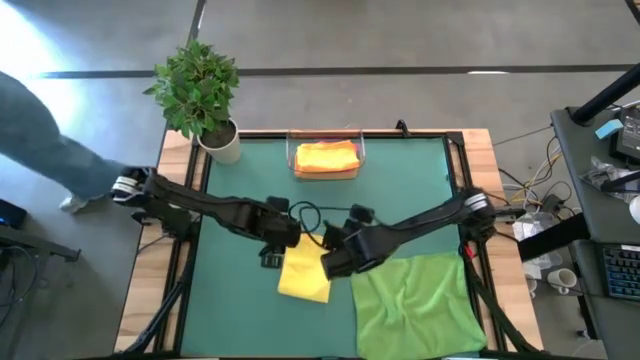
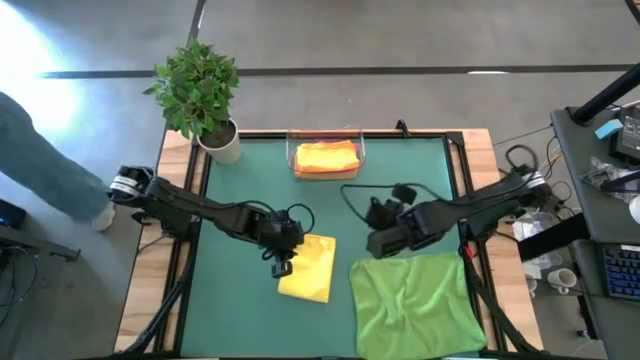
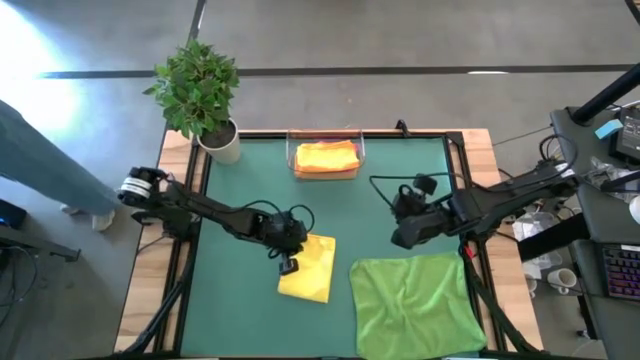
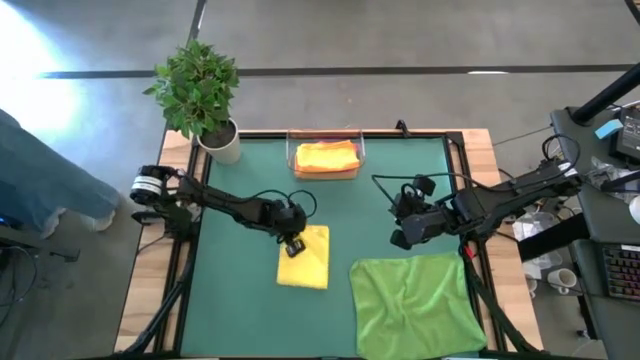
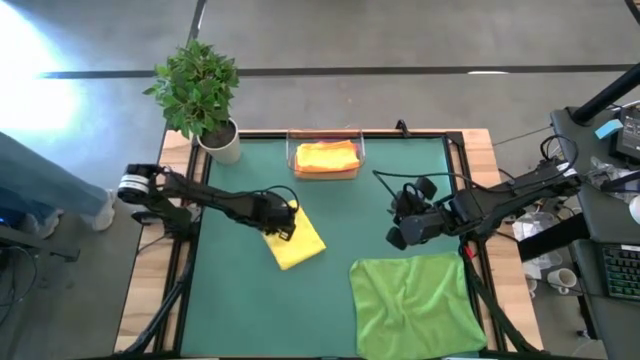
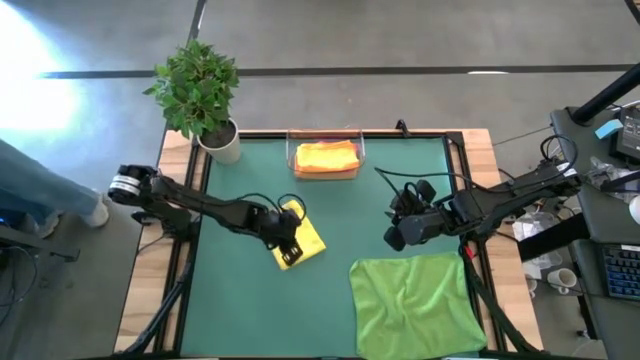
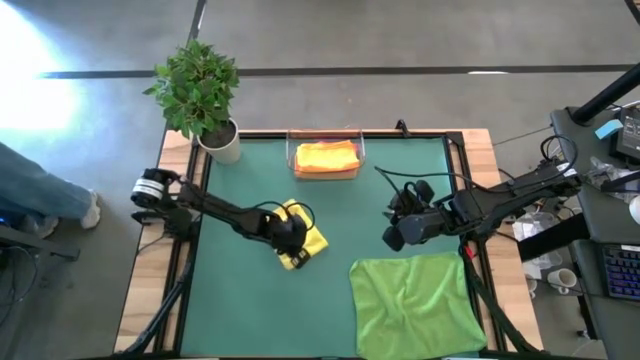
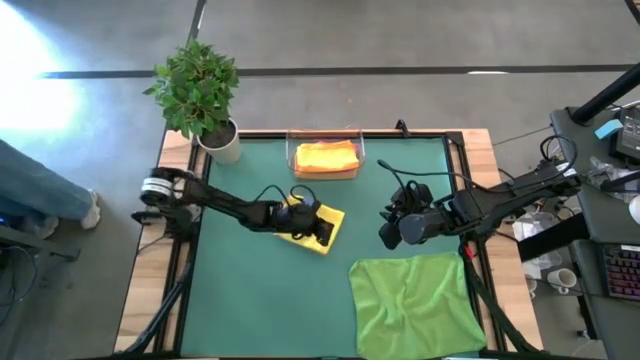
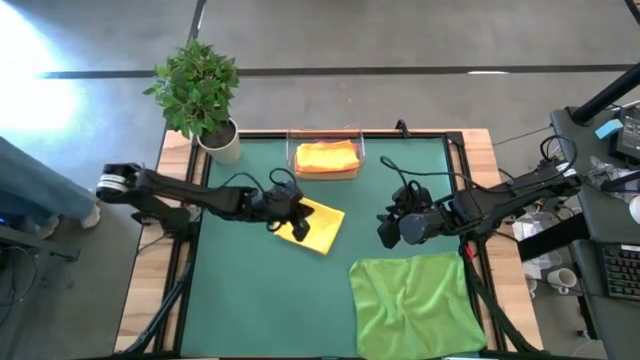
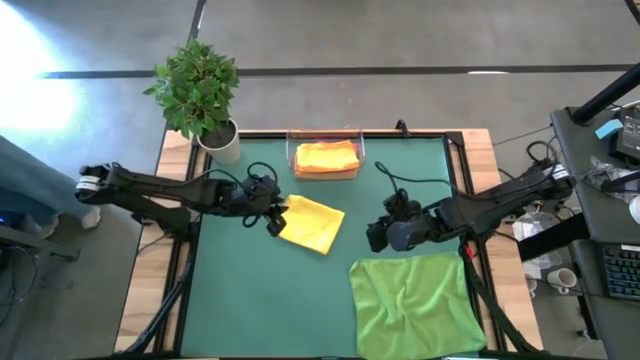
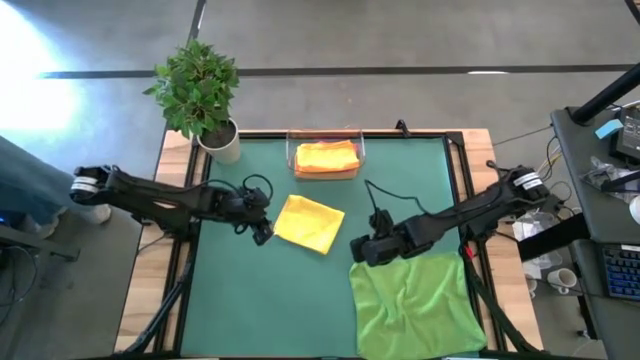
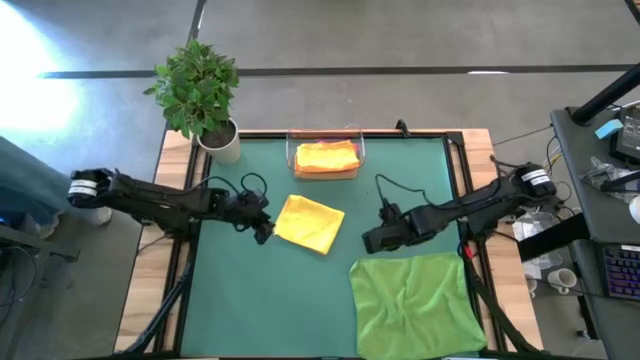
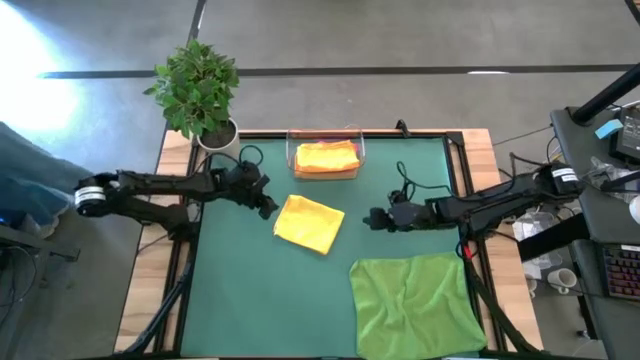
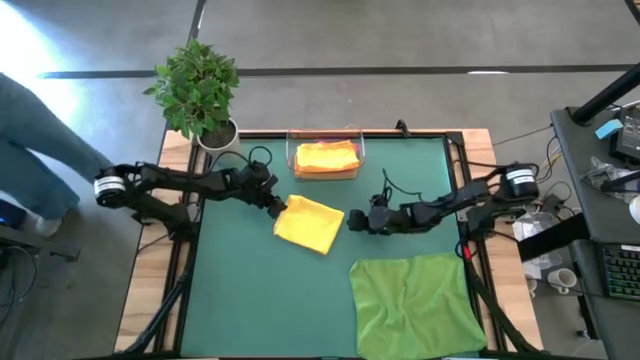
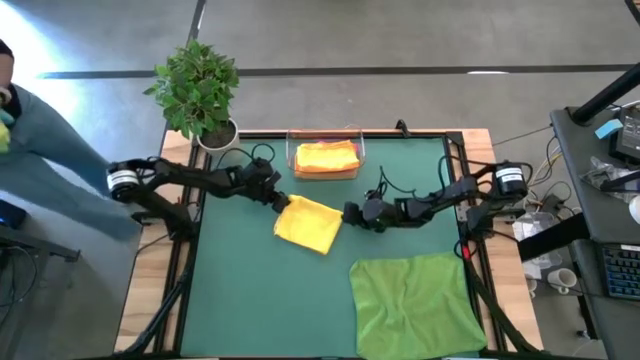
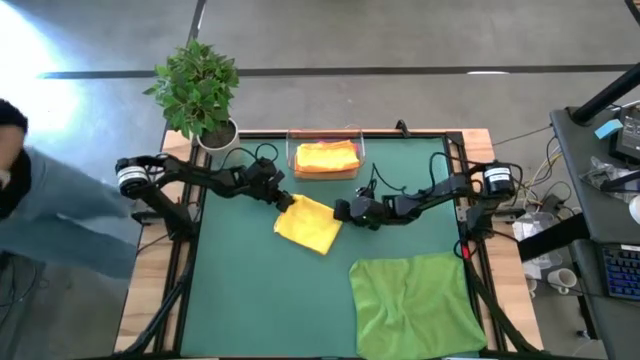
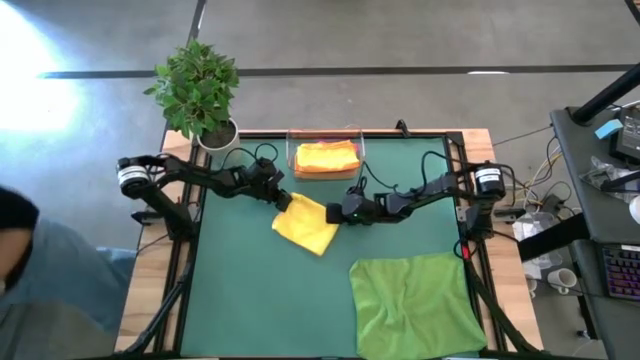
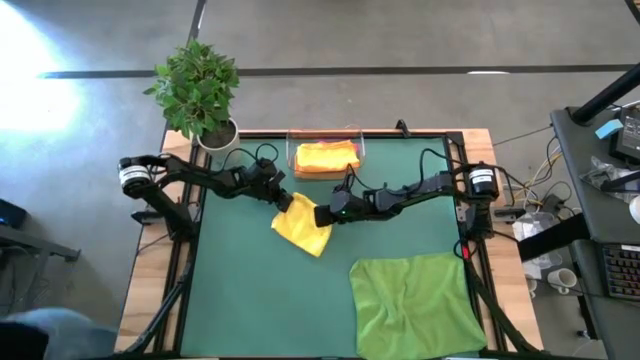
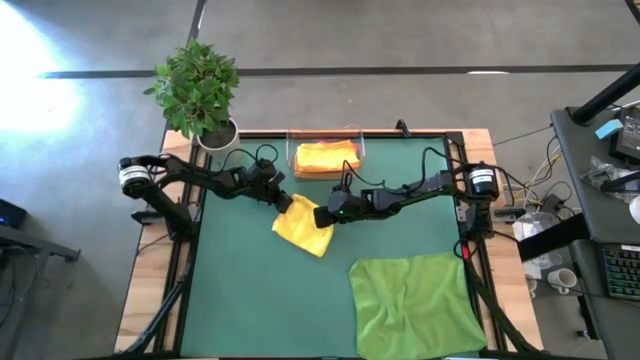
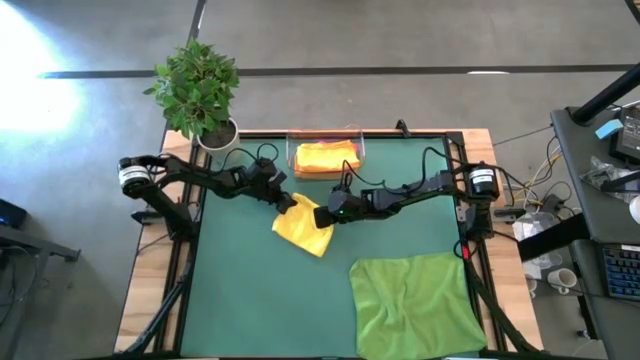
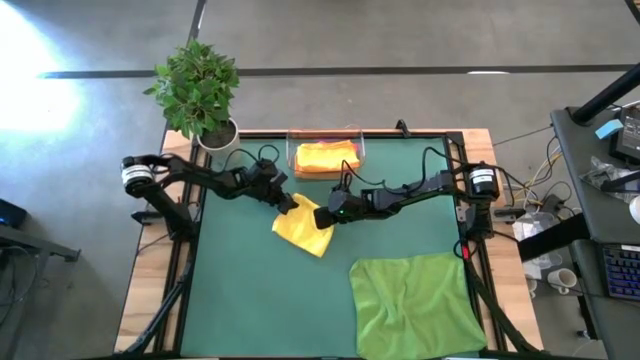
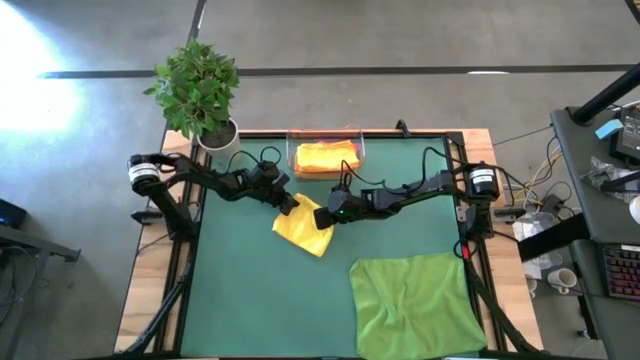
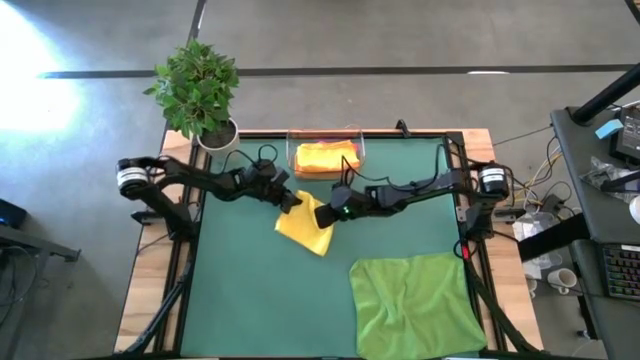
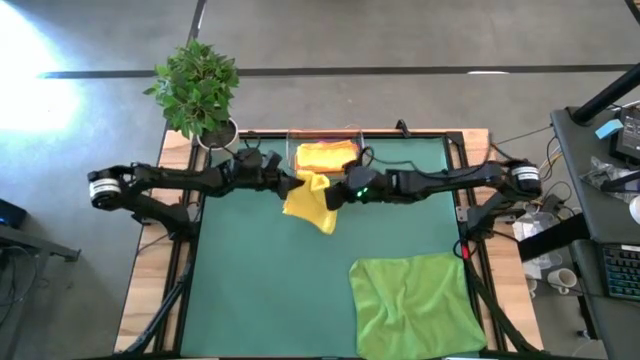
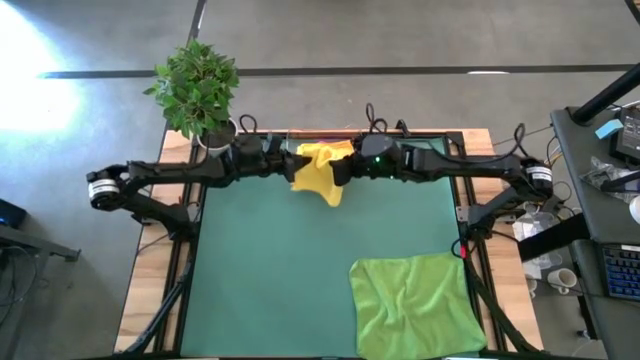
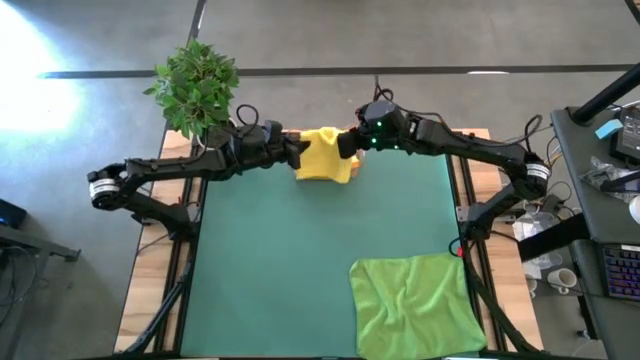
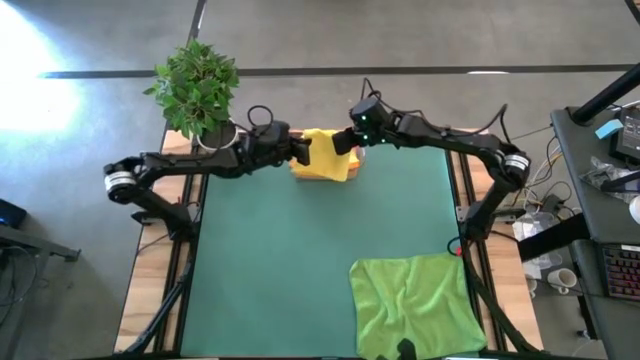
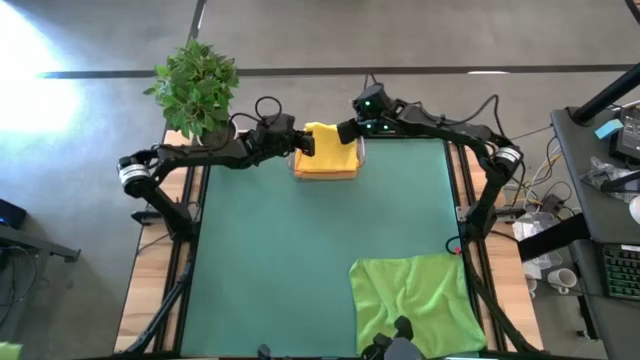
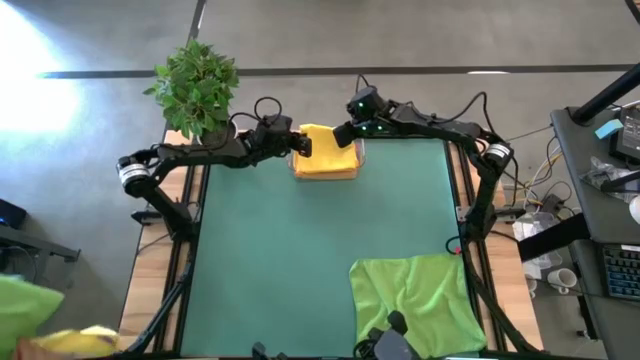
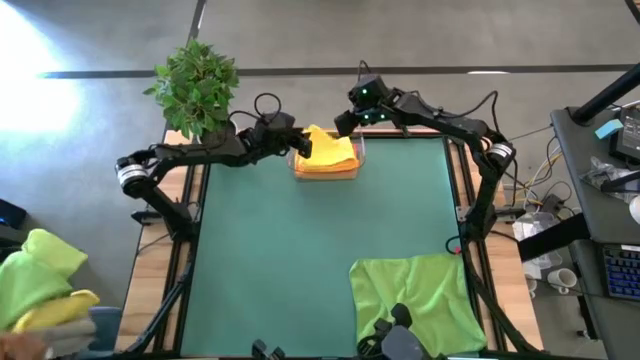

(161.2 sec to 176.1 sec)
Task: Fold microfiber towels
Put the yellow microfiber cloth into the bin

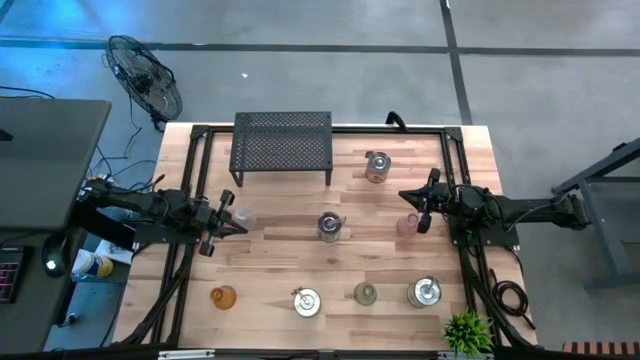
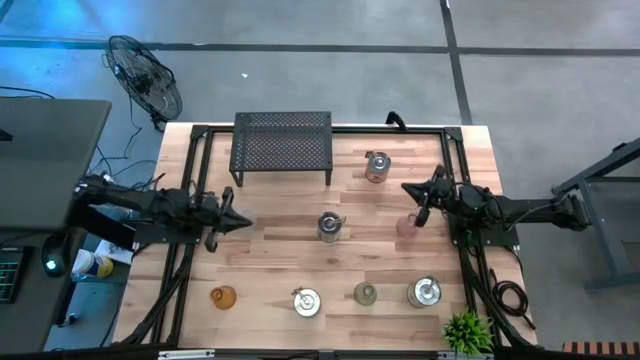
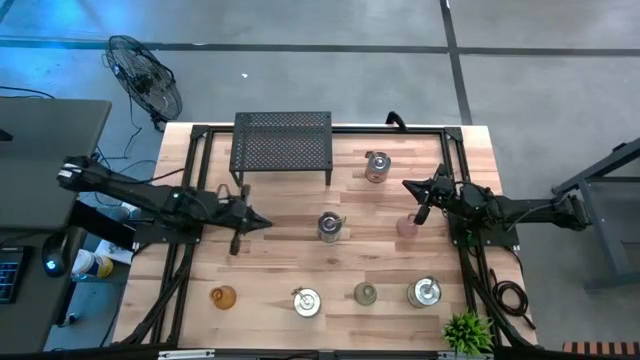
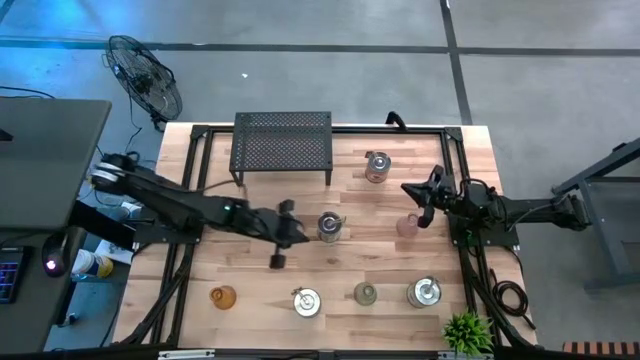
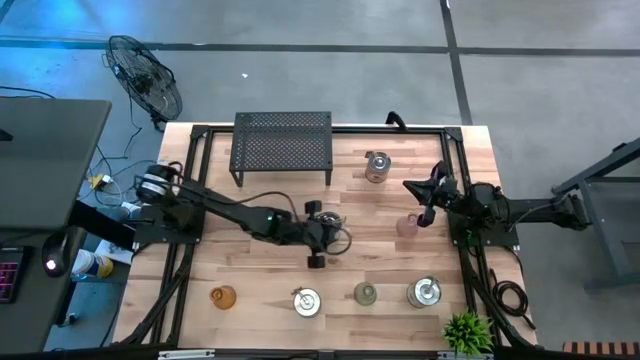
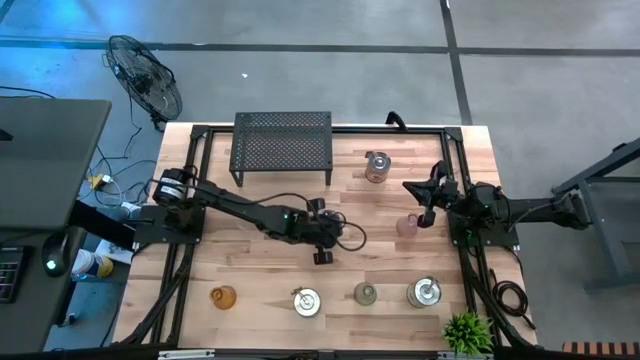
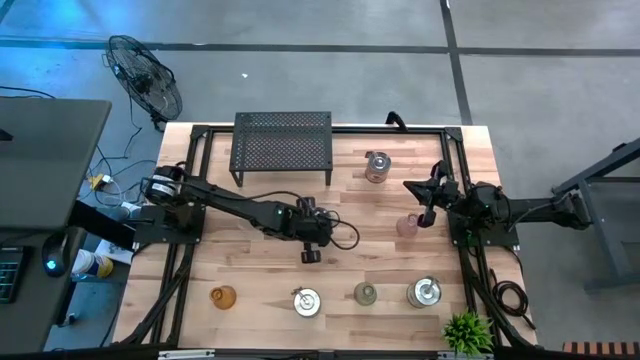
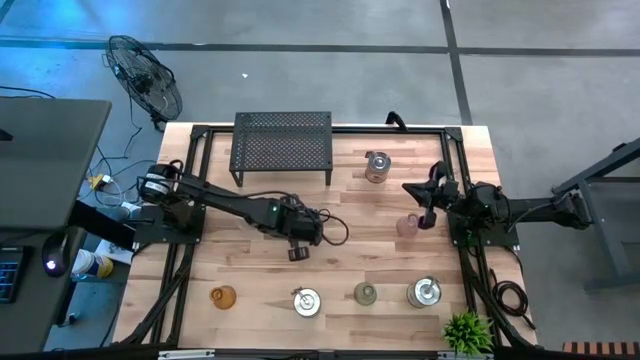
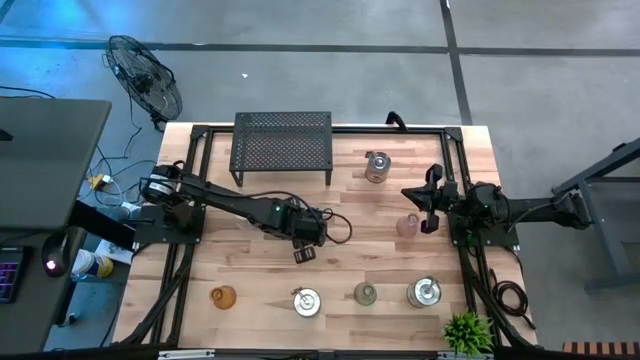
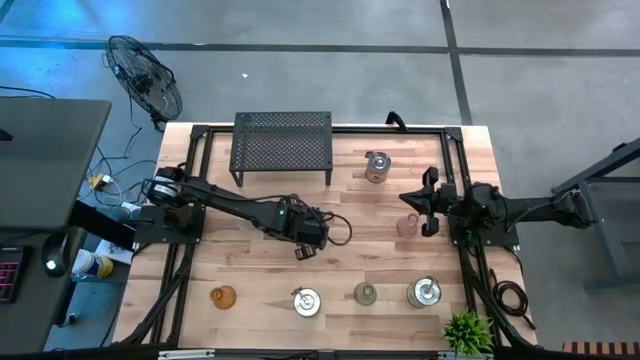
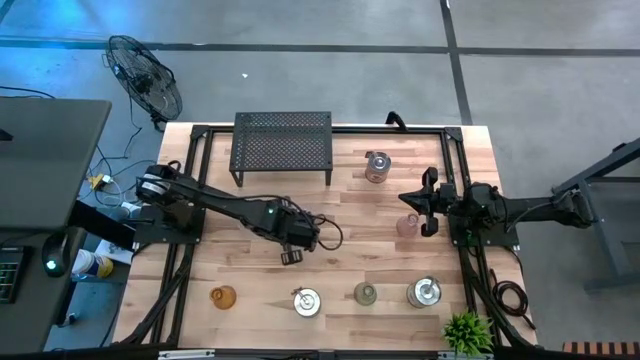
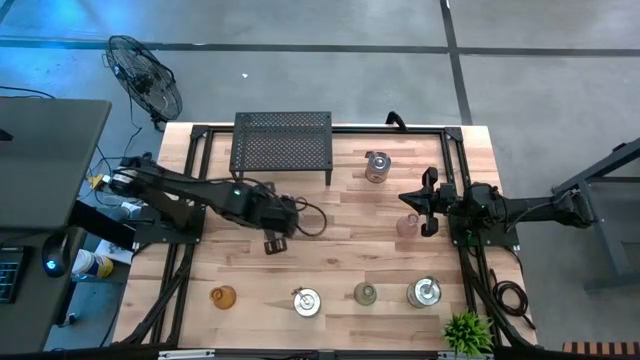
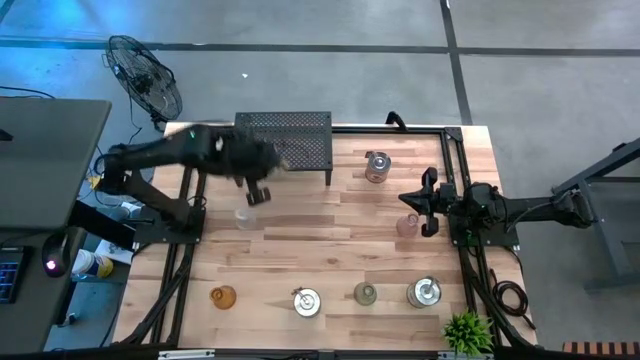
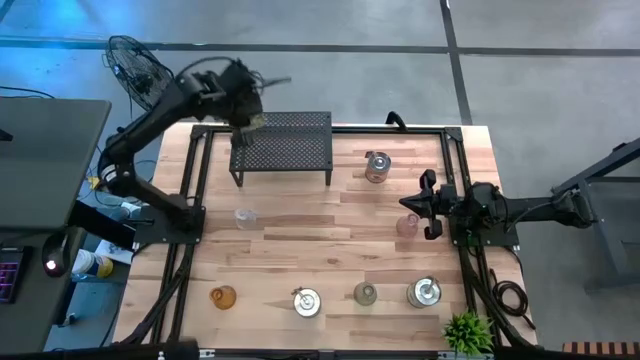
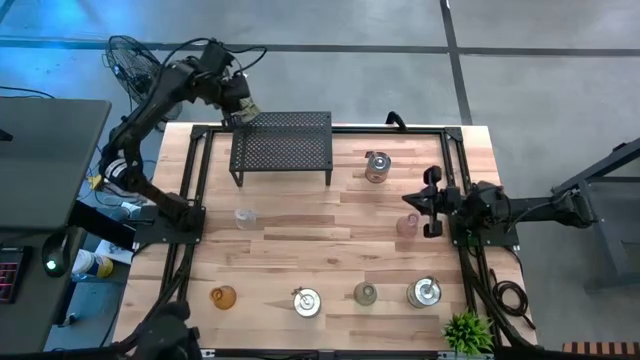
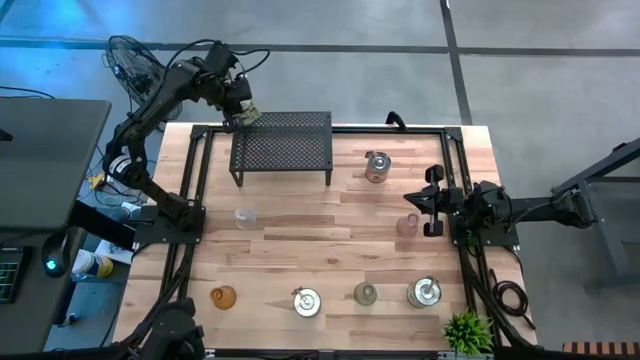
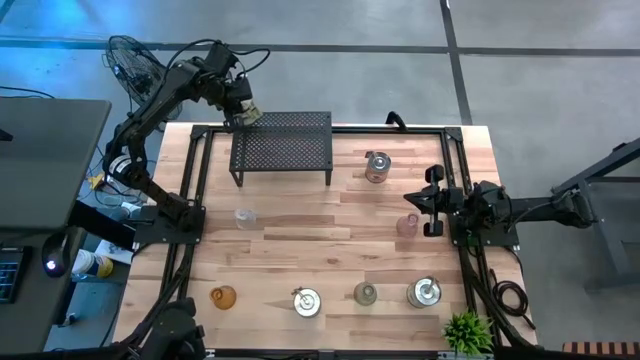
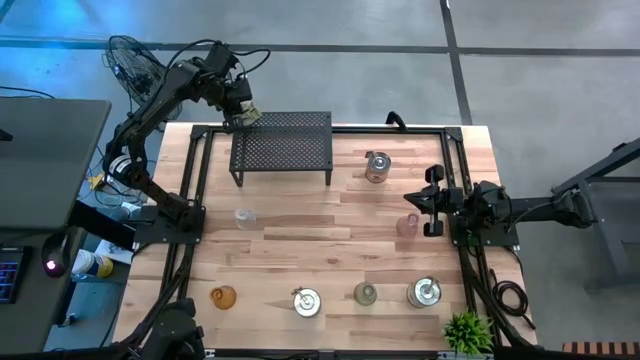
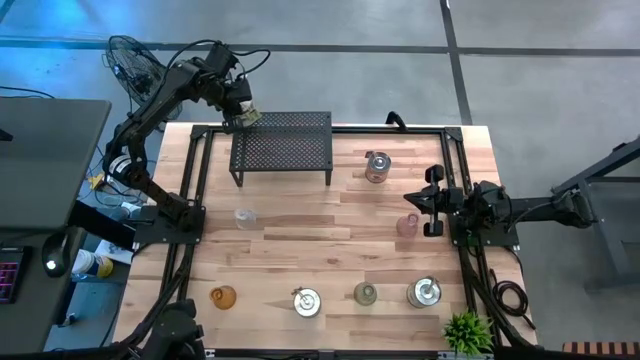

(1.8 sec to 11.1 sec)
Task: Pick & Place candle stick holders
Put the top green scented candle on the shelf
